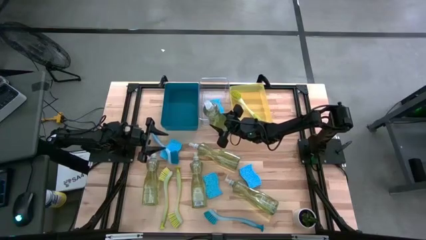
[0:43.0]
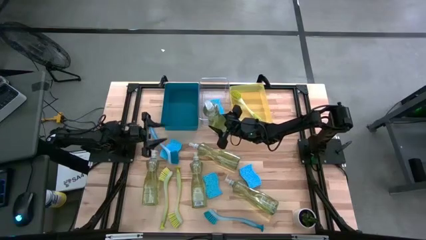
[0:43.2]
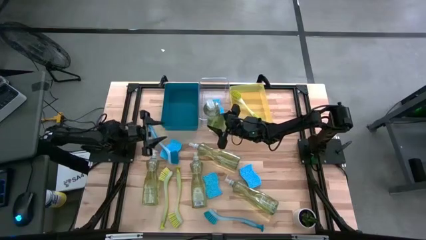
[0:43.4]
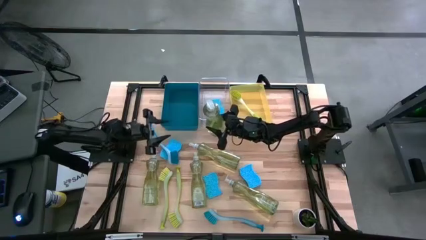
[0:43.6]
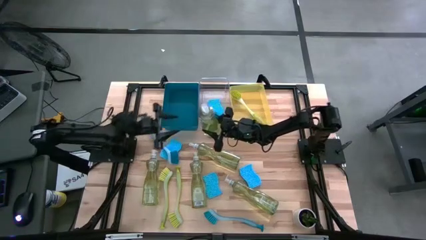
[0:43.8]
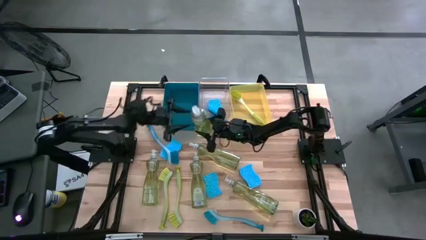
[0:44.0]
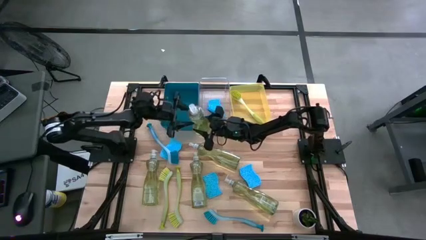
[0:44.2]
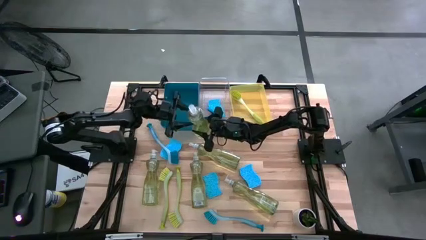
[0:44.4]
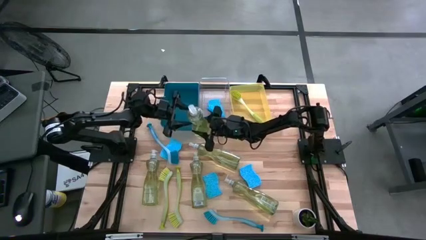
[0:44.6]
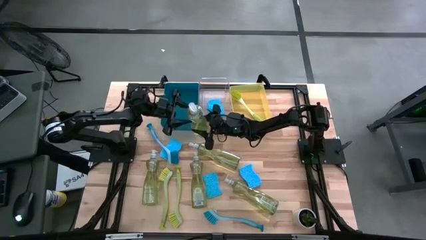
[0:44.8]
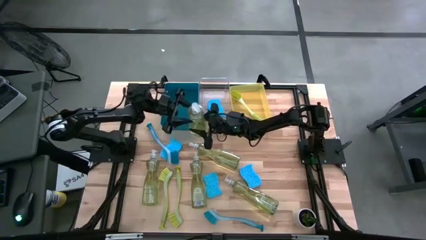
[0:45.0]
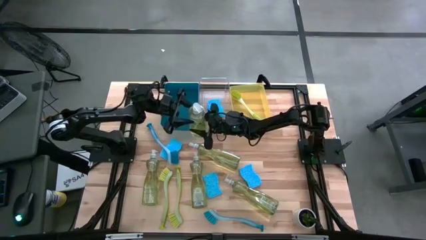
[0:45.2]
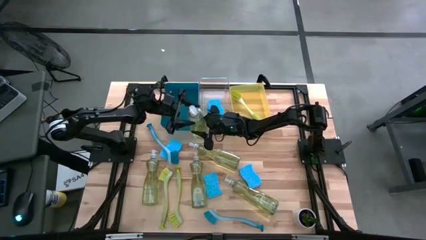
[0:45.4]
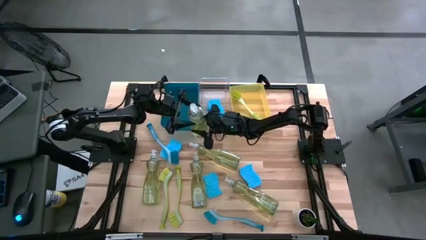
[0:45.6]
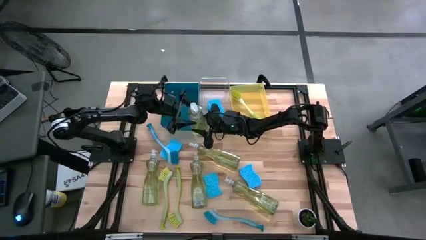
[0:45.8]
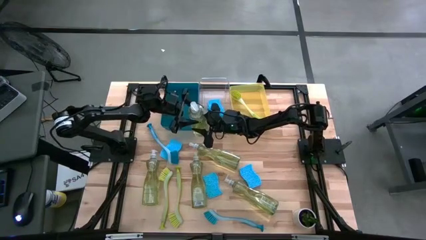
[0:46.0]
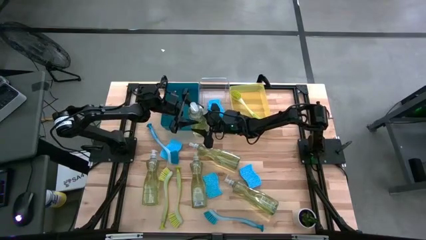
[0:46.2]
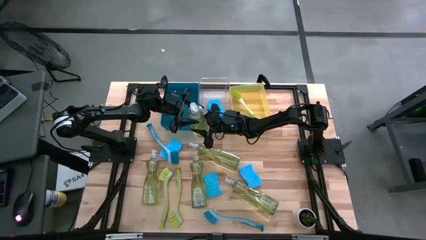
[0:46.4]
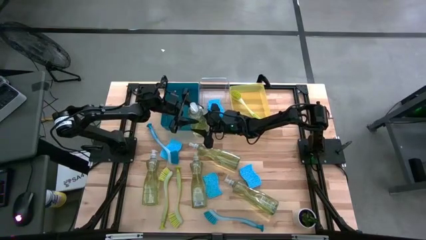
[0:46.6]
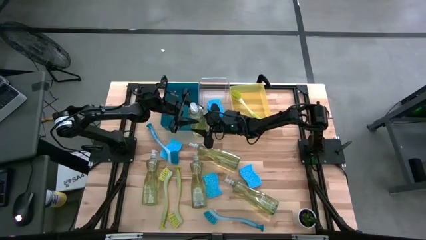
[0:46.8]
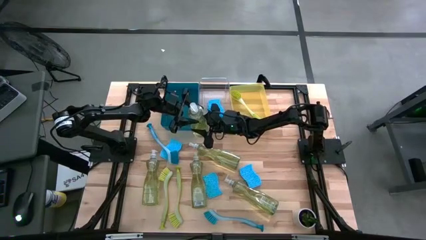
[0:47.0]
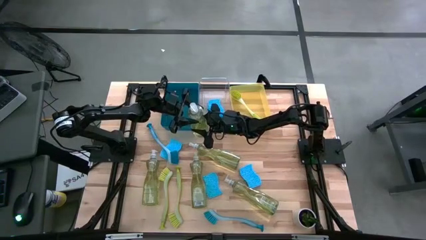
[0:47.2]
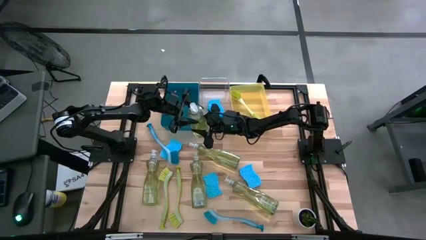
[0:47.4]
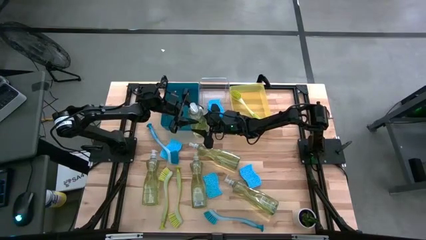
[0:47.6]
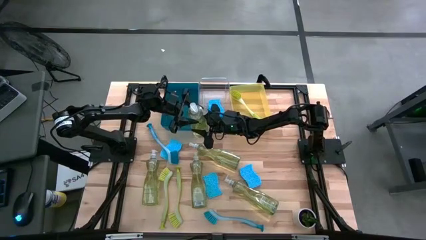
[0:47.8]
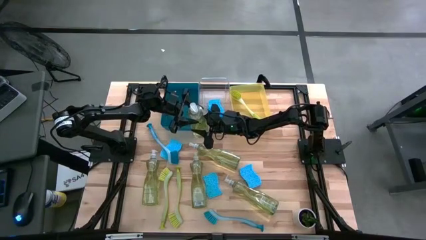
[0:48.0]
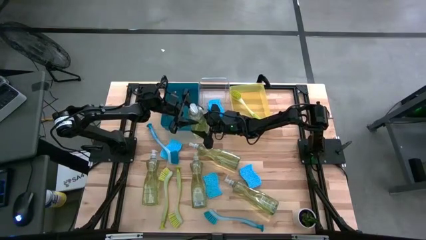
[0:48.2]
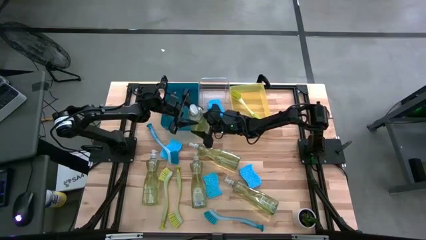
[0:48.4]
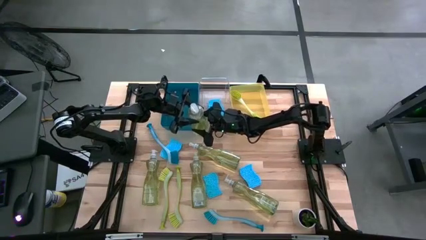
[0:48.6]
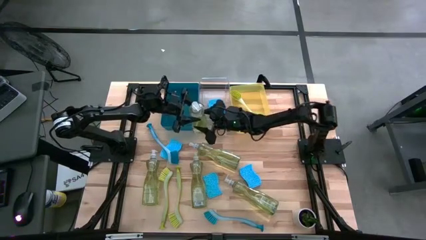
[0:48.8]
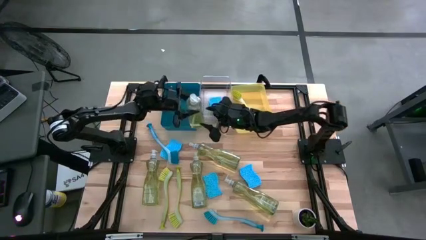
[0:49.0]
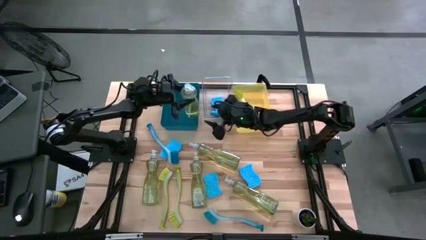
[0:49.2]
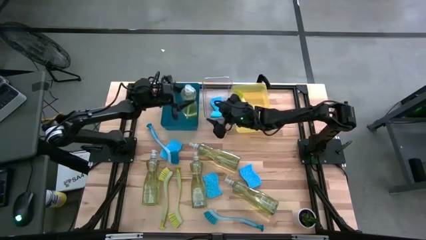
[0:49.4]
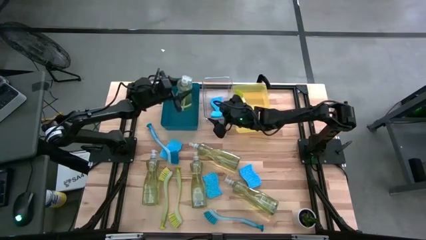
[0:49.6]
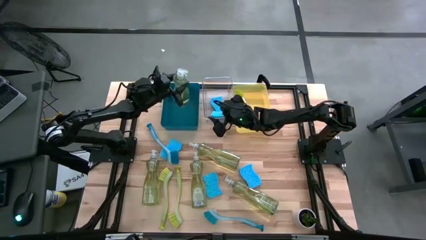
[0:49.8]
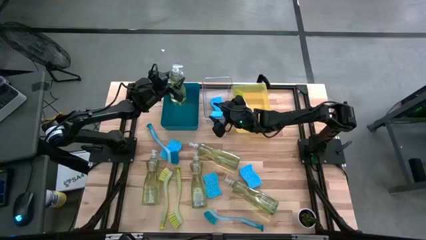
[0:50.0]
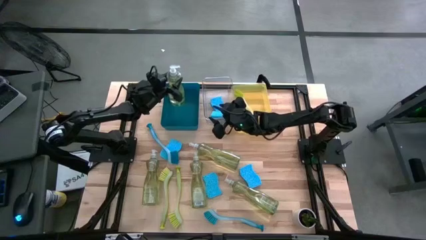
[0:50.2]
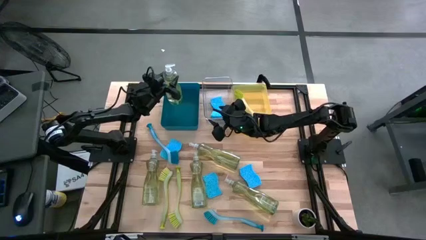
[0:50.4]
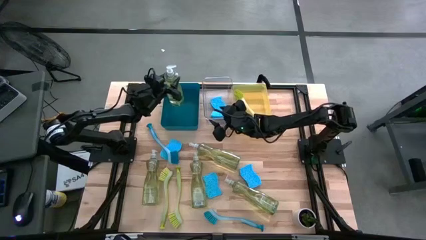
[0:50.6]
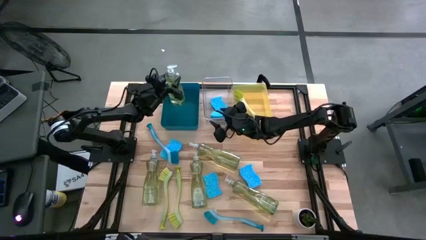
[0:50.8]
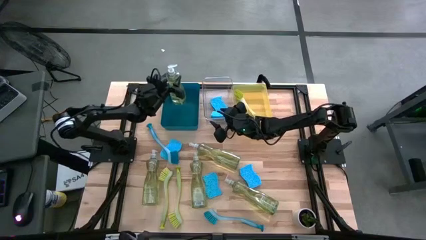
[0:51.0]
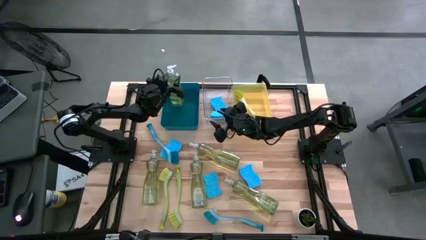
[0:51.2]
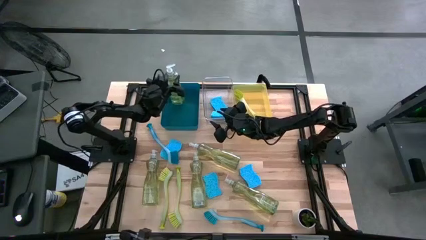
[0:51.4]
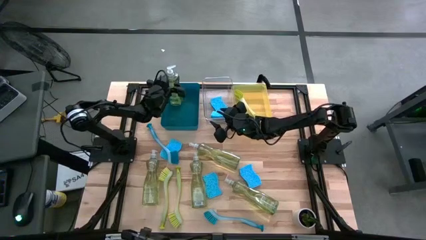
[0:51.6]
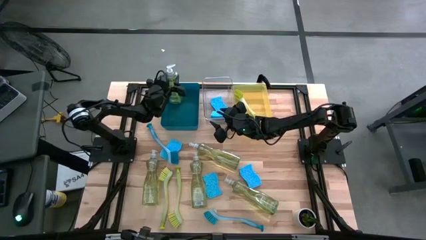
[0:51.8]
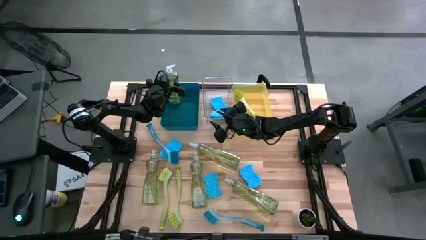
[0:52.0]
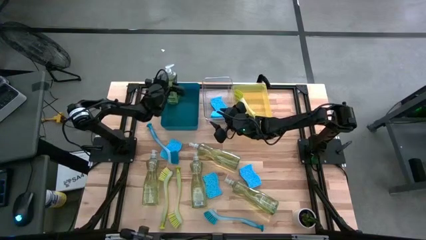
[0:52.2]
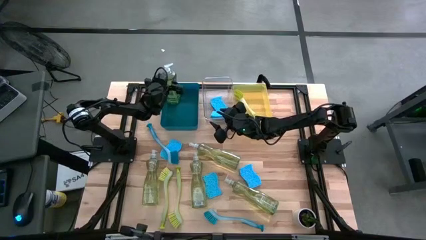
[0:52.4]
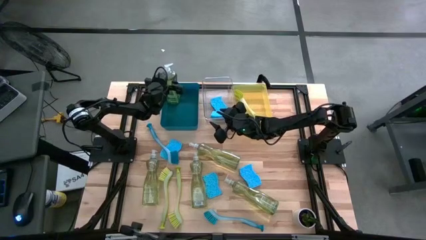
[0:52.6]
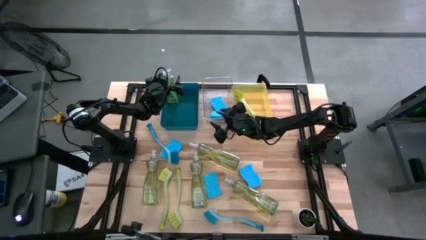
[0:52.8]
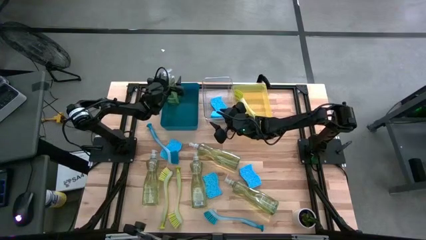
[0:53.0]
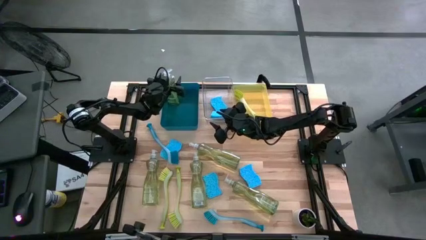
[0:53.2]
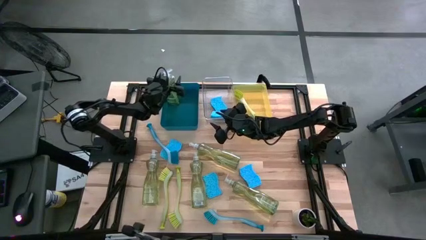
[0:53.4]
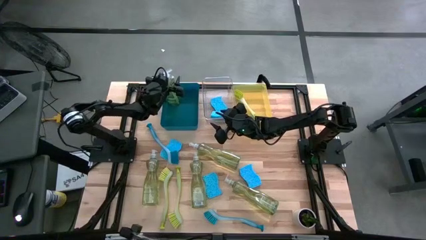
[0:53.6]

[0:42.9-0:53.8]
Task: Pick & Place Kitchen Sink Supplies
Put the dishwashing liquid into the blue bin

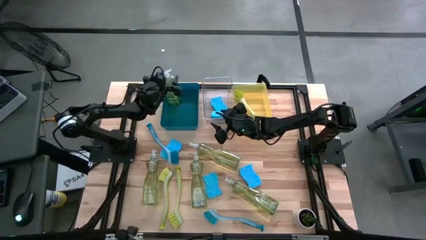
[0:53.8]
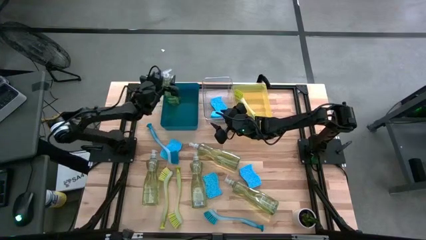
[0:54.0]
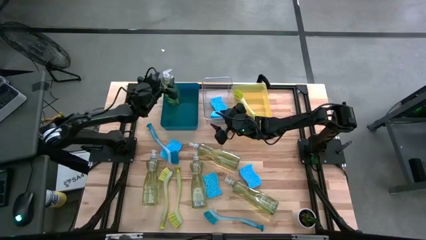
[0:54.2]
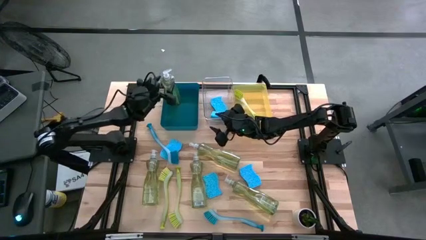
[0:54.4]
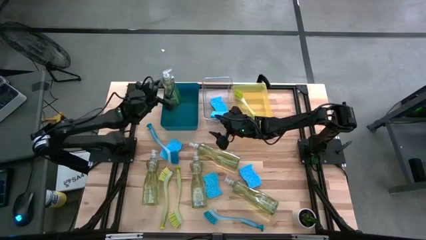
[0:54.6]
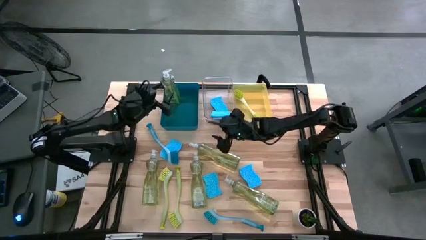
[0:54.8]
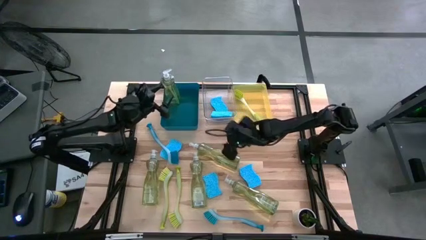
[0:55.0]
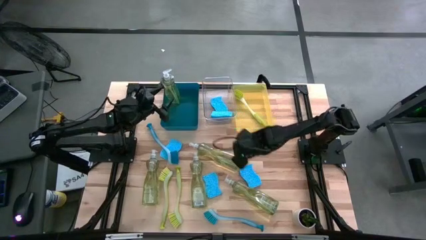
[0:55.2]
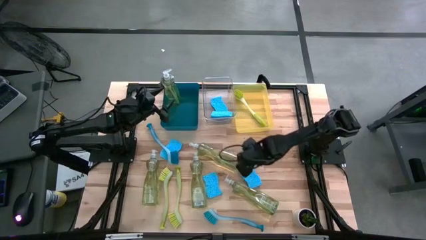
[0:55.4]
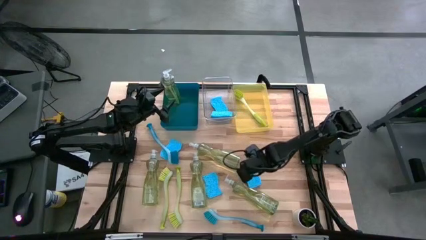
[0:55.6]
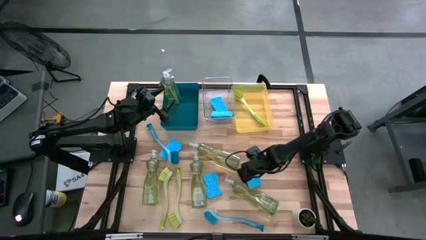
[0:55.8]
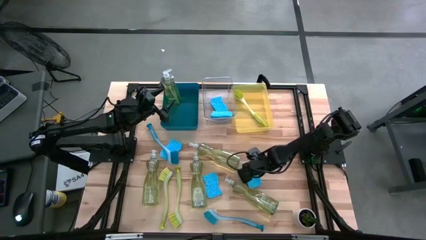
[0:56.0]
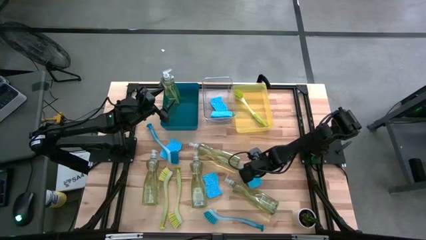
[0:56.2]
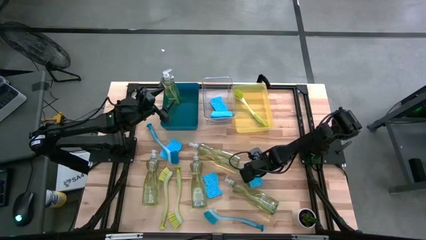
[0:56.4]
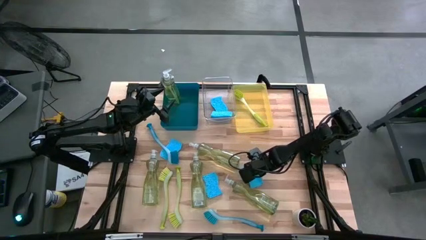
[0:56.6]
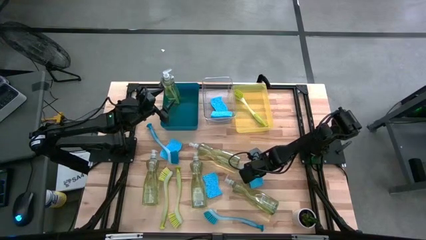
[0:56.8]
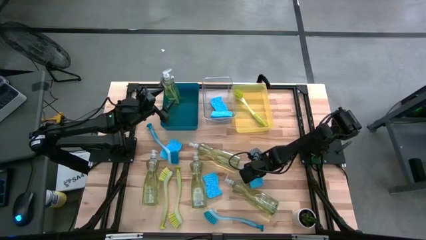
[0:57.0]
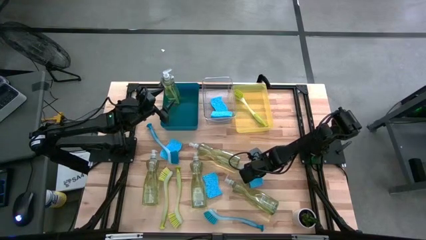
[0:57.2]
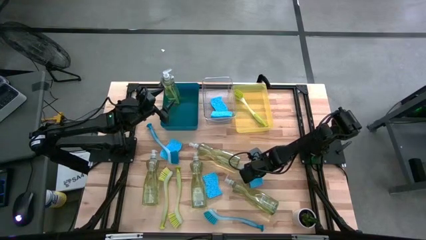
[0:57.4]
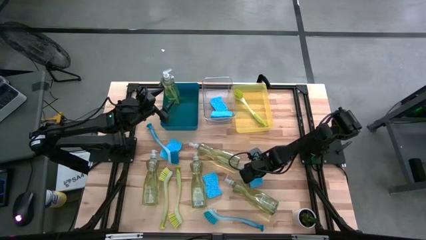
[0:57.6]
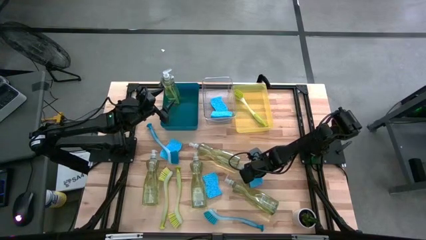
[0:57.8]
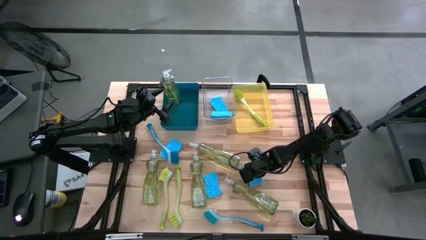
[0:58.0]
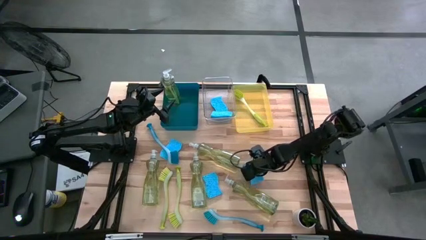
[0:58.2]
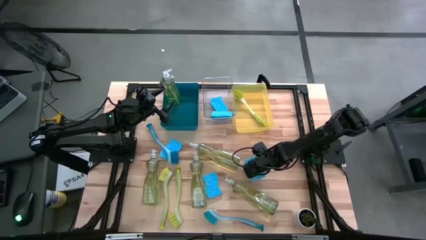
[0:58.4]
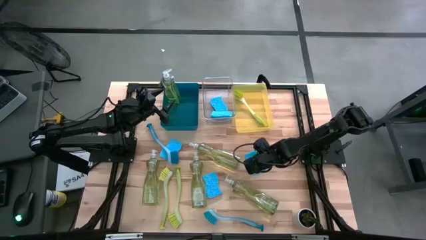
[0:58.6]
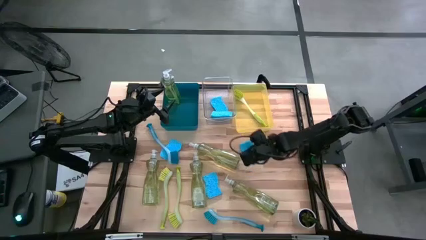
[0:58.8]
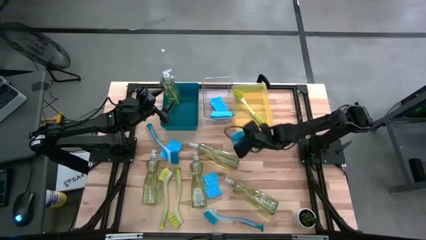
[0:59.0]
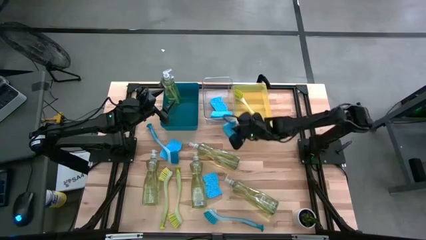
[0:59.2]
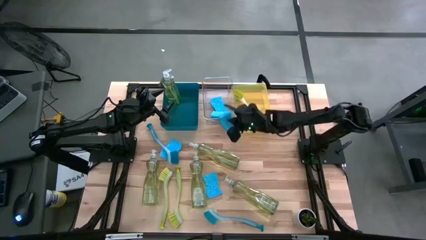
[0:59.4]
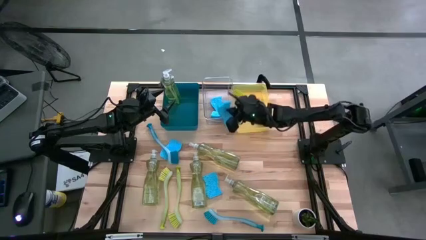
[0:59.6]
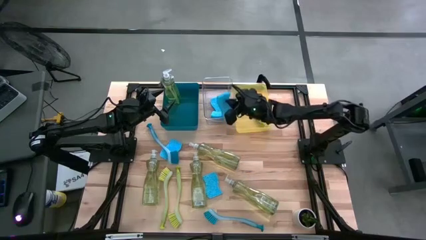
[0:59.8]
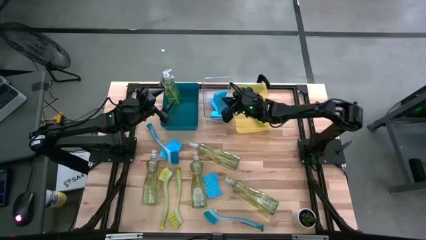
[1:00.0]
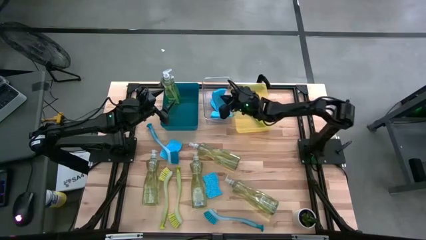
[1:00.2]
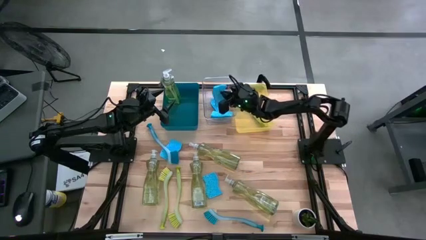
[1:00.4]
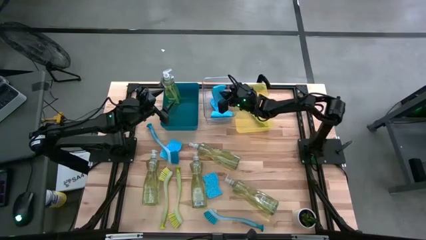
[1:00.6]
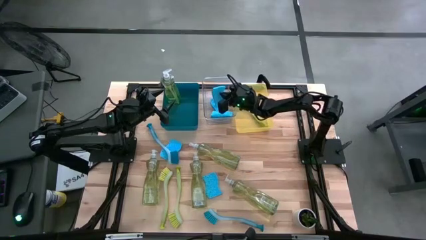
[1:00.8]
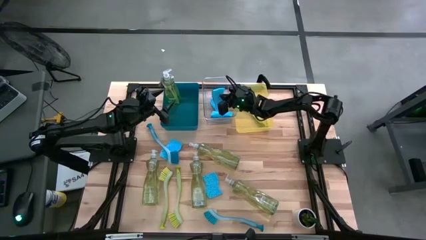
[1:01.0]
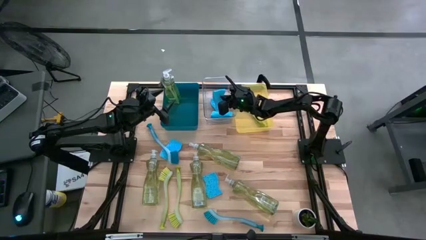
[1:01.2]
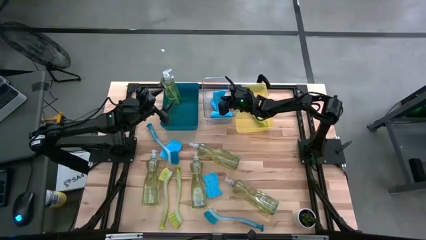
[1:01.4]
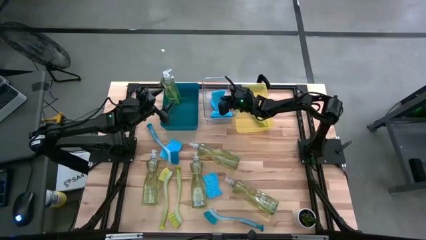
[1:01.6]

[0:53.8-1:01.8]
Put the blue sponge into the transparent bin
